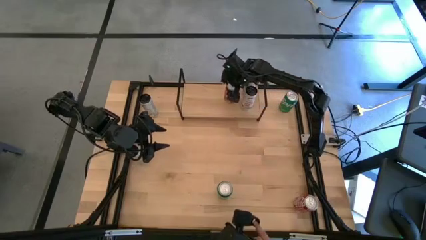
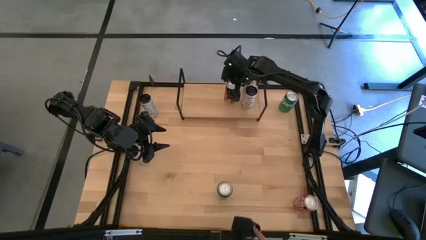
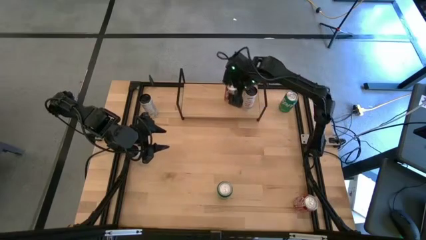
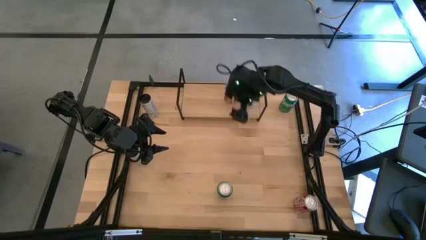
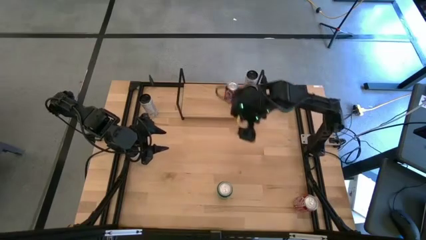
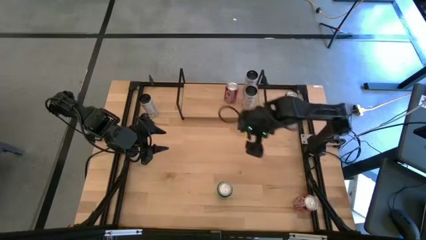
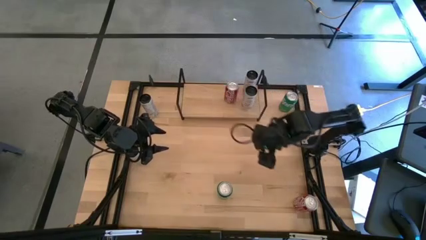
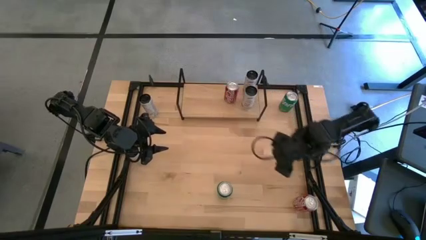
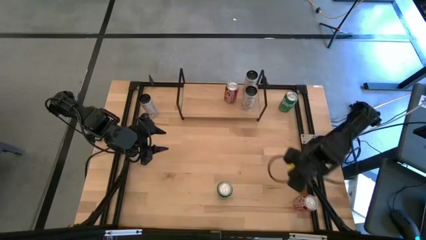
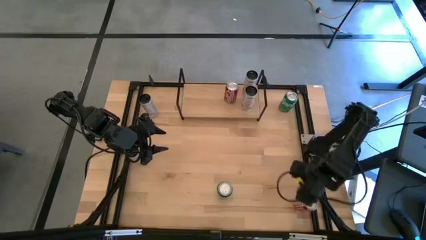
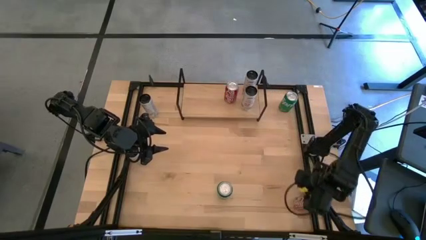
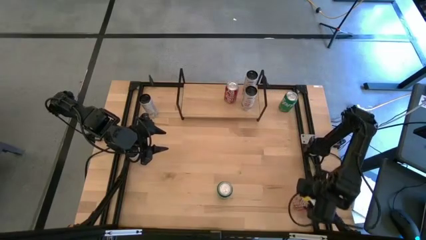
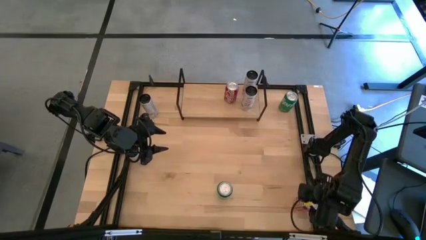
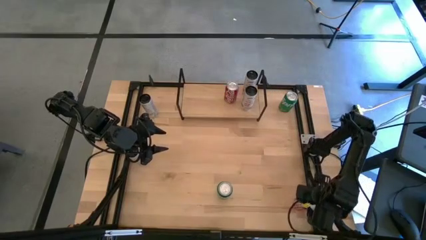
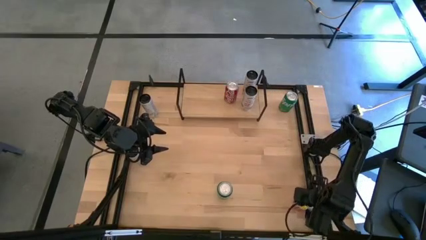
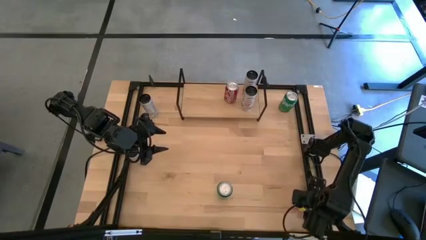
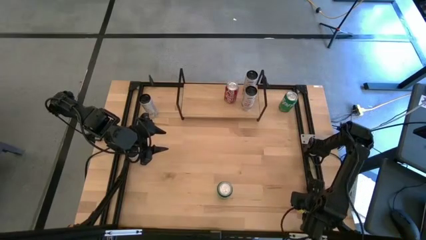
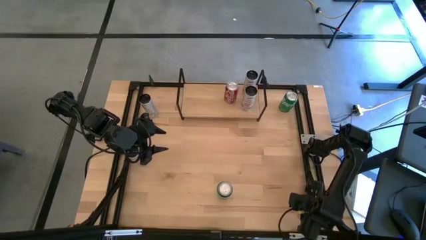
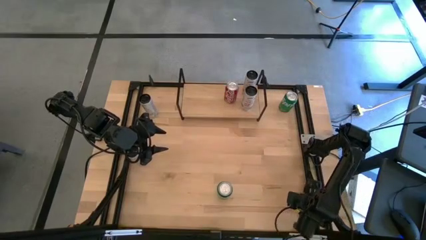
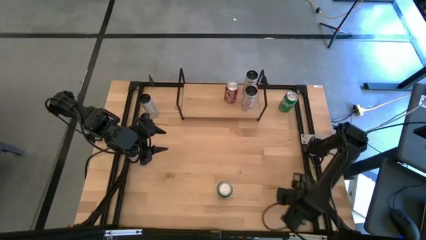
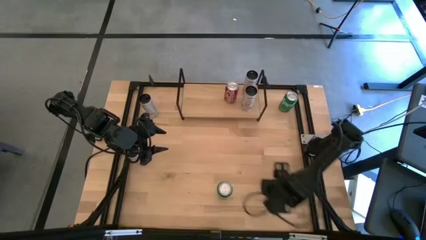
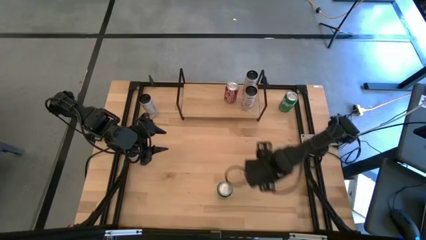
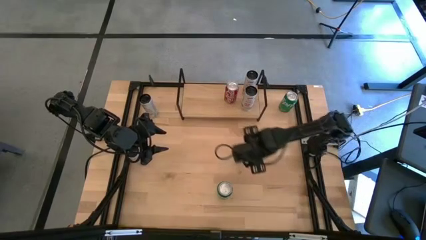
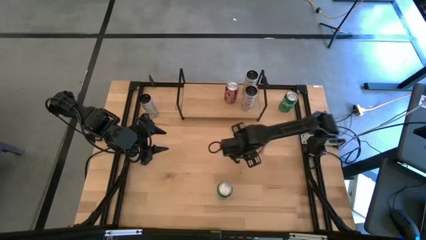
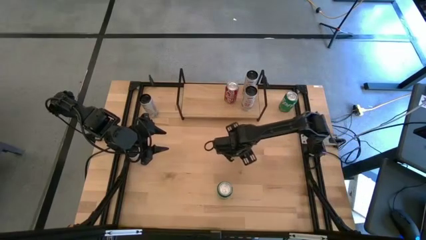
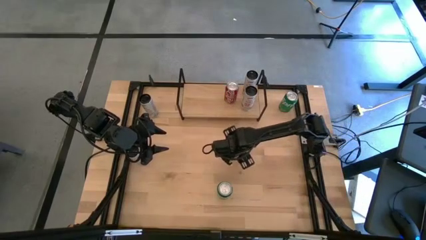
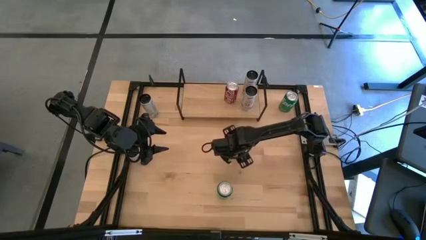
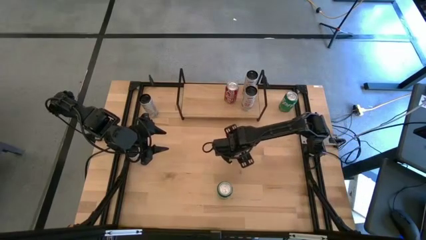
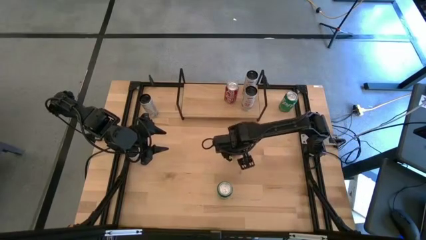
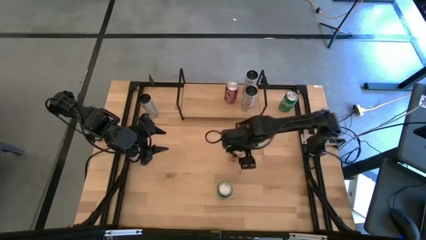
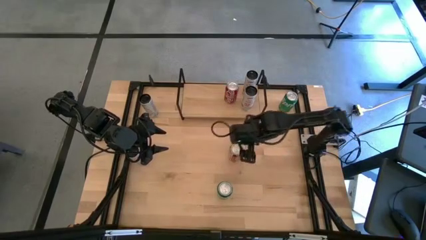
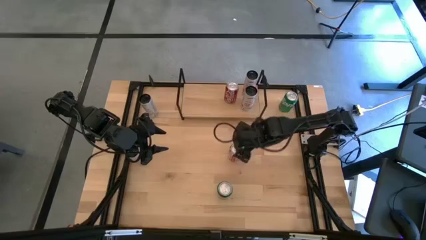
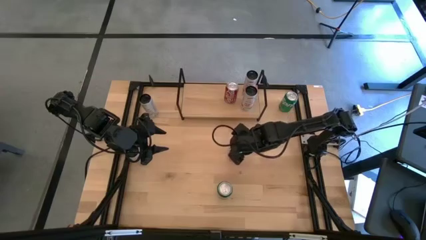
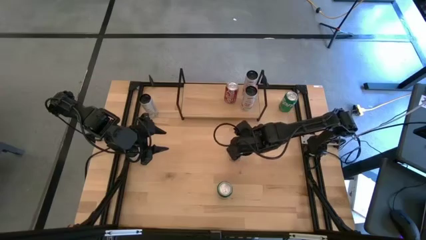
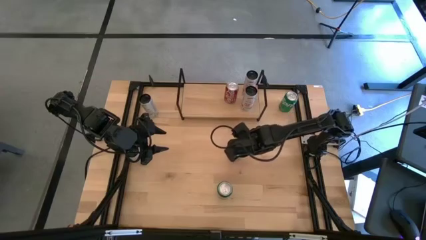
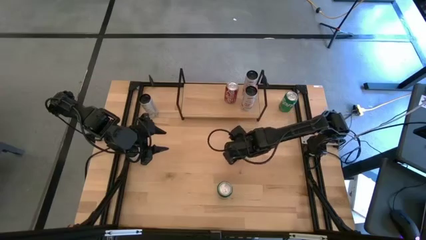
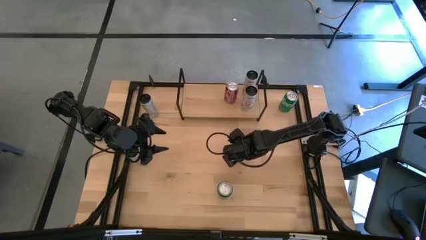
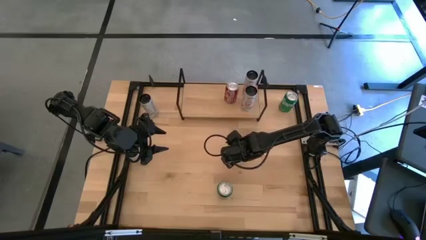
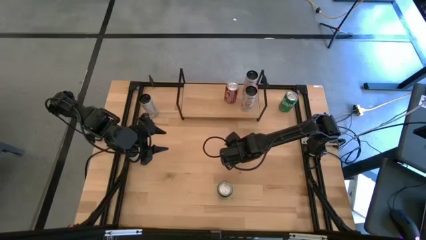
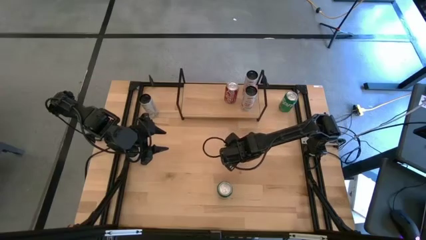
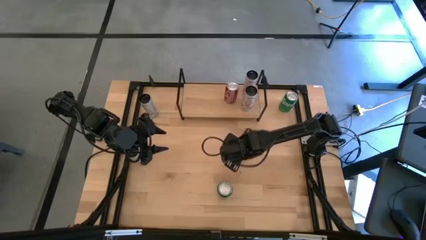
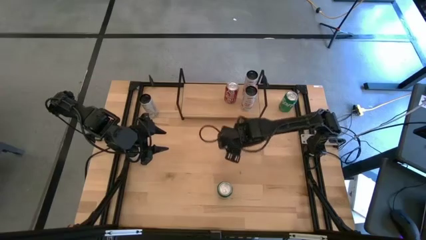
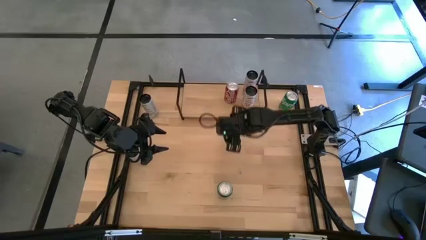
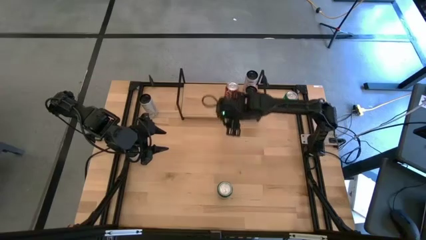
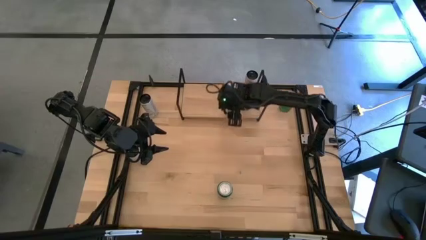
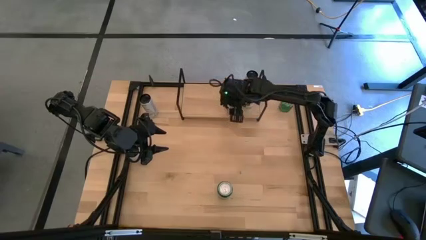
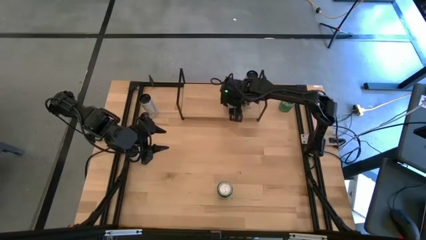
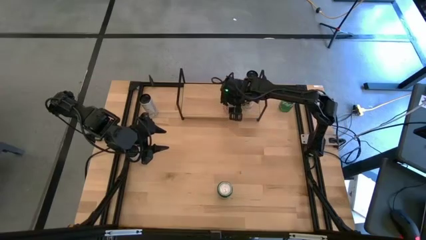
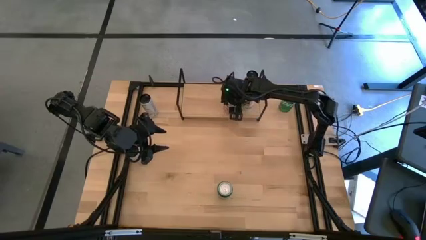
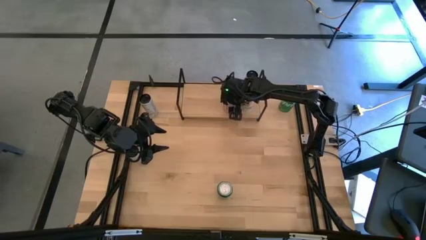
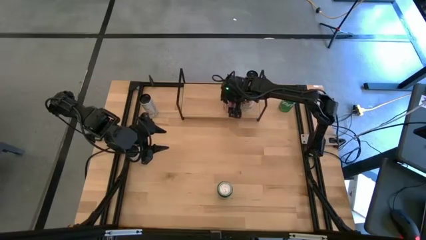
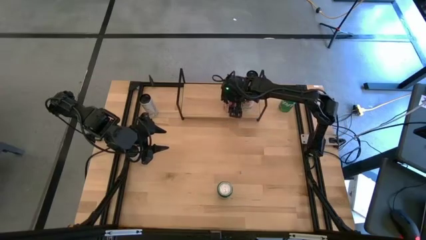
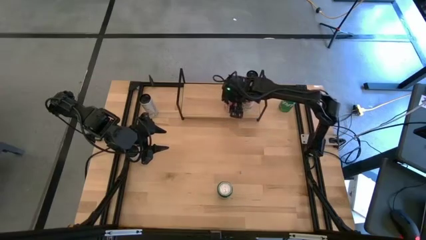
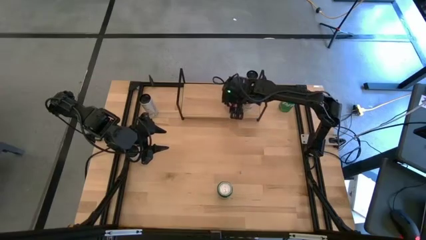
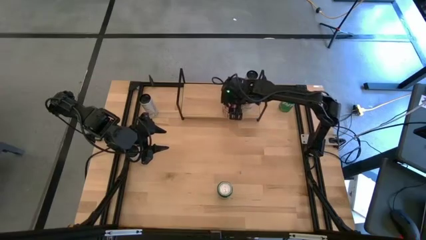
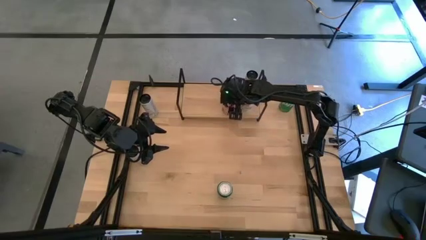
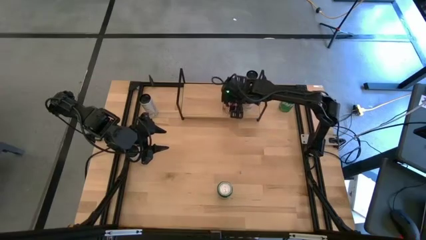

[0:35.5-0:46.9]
Task: Place canned beverage on shelf
Put the red soda on the shelf aligned with the other red soda can

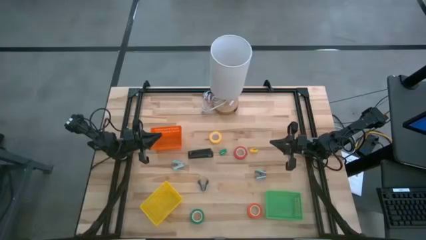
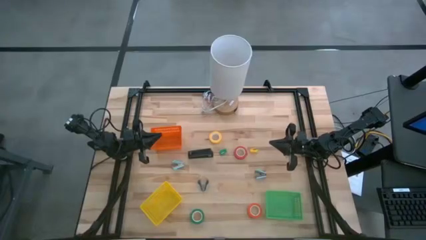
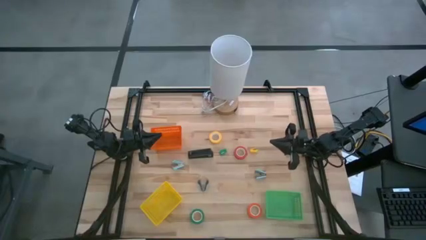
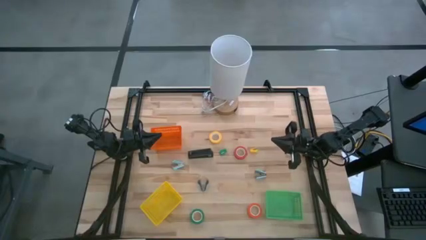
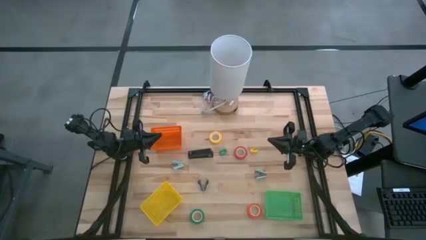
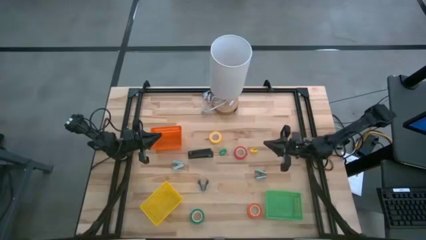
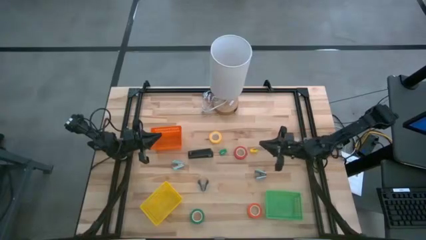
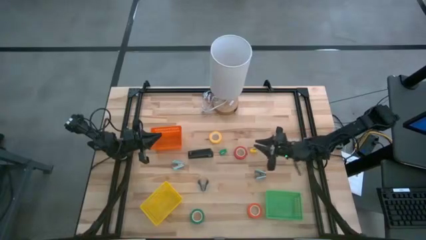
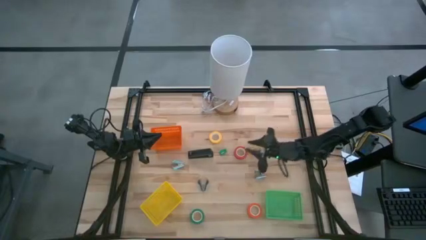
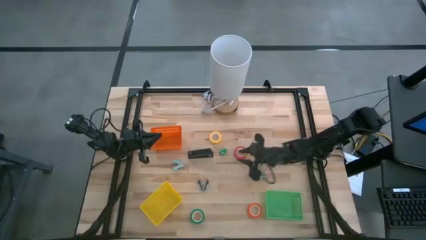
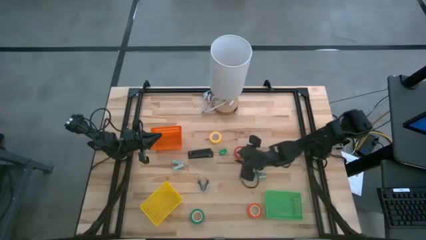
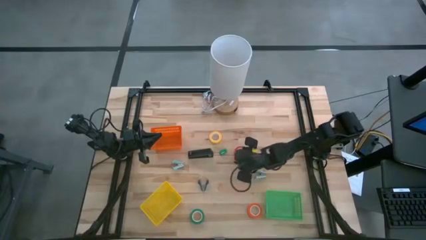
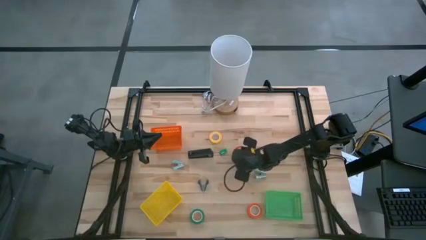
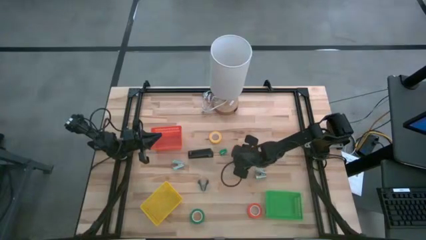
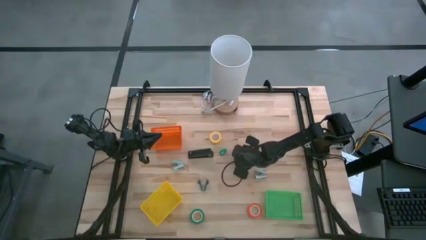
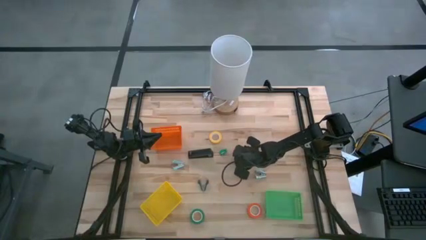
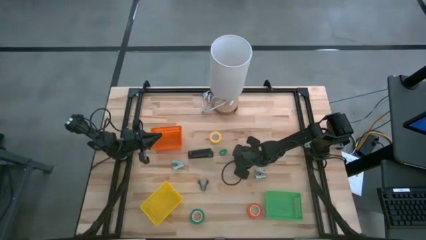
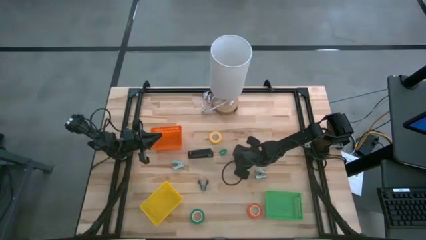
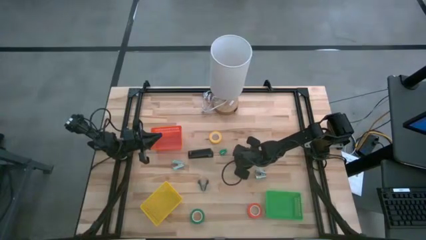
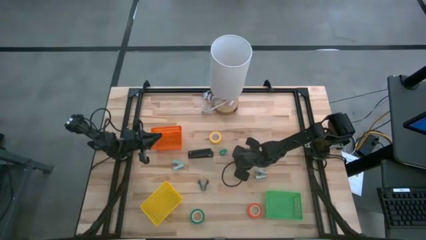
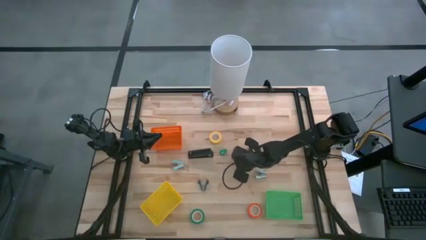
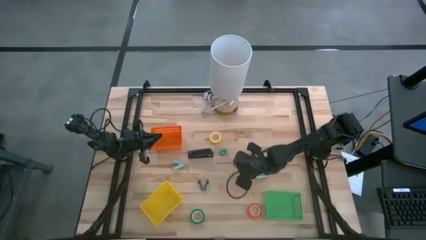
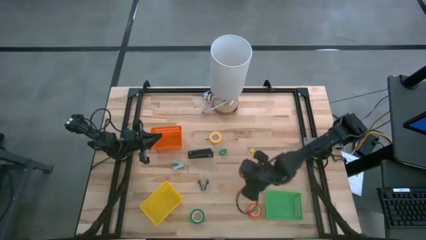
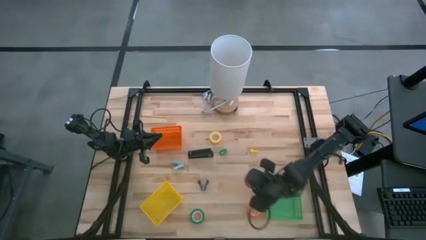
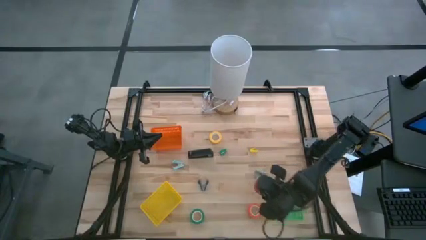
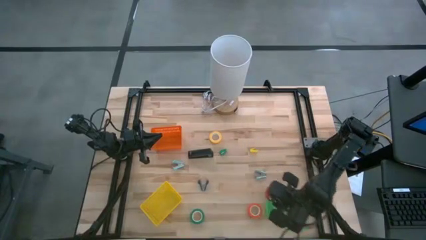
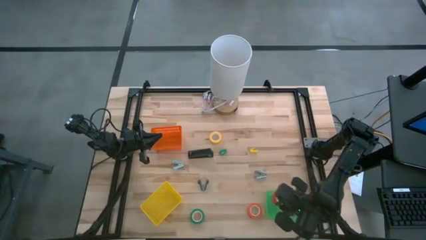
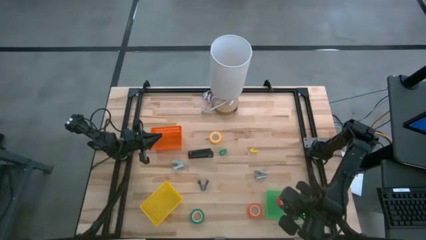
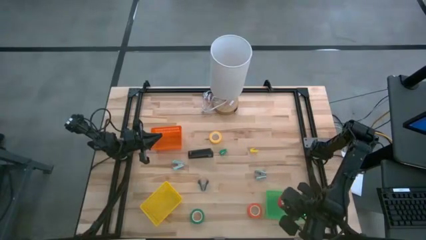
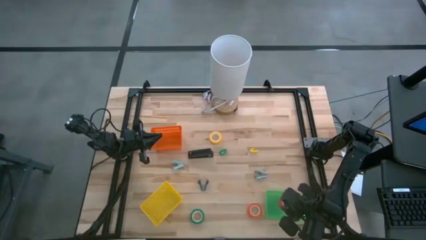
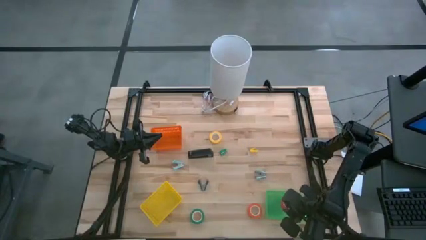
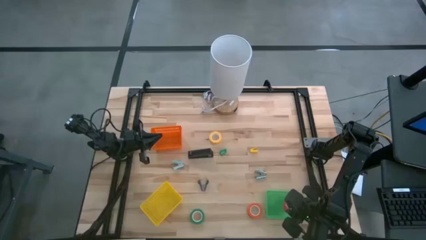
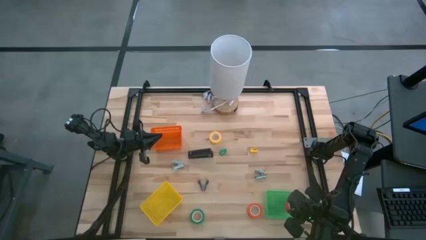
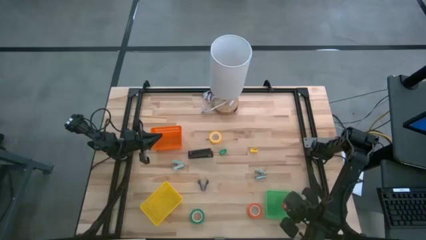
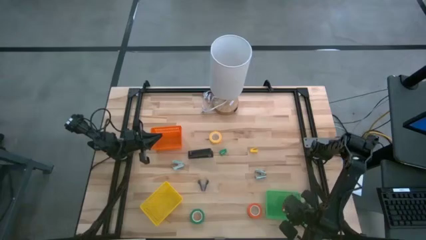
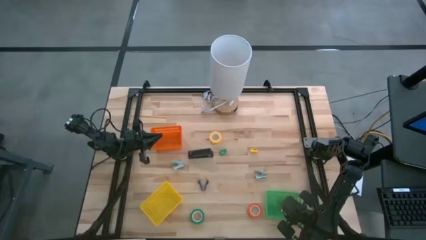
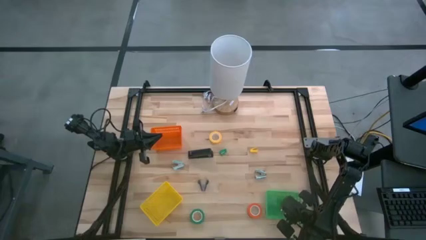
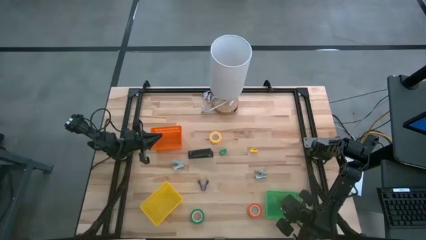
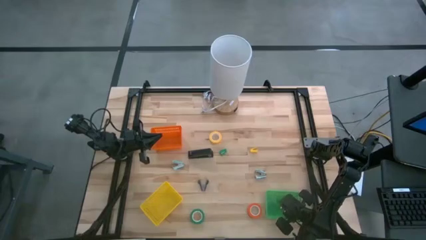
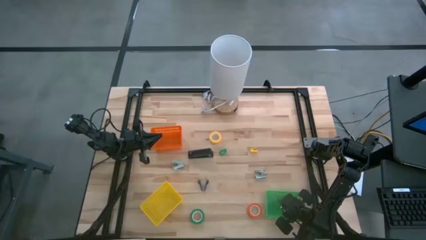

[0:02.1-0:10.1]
Task: Pick and place Stapler, Stapler remover, tape
Put the red tape into the green bin
